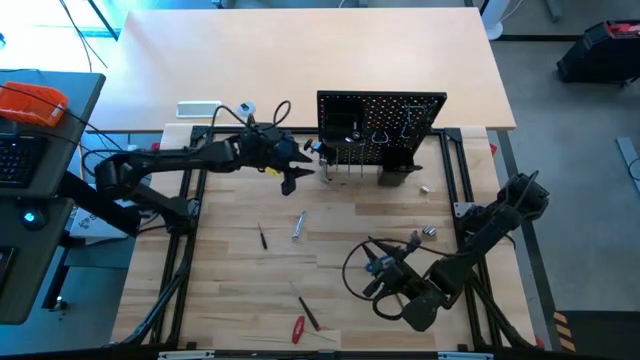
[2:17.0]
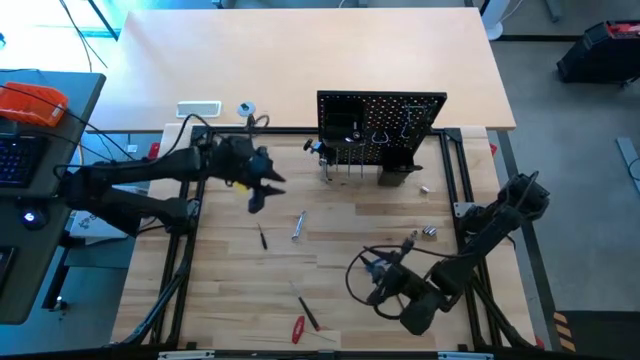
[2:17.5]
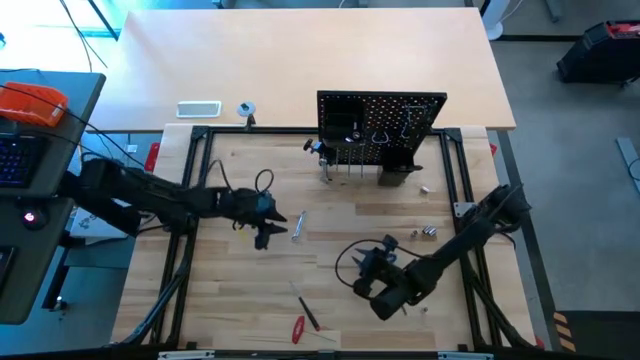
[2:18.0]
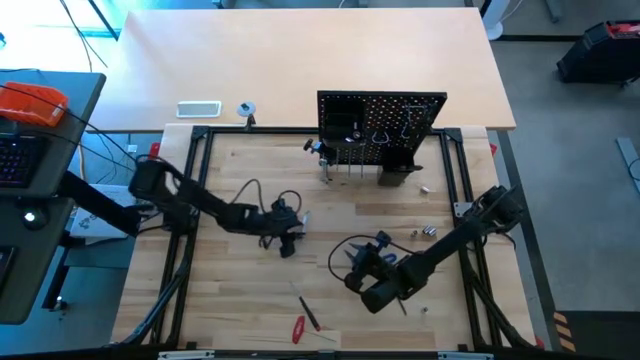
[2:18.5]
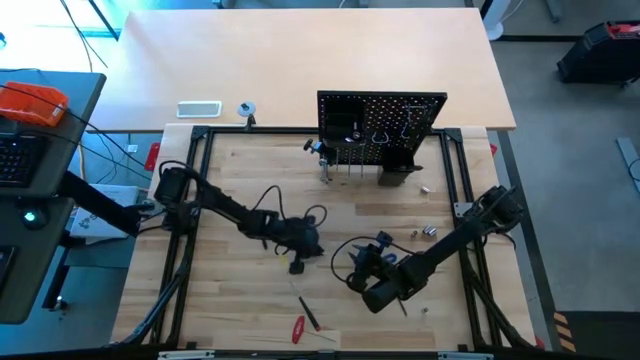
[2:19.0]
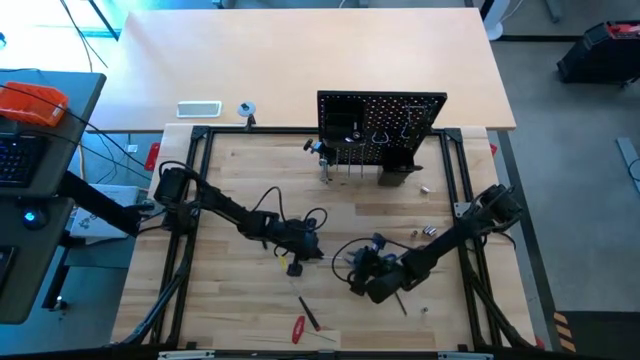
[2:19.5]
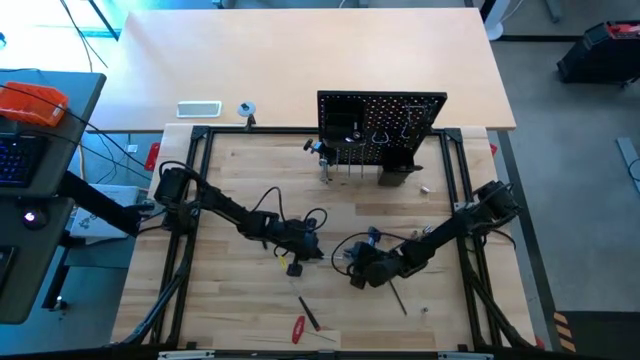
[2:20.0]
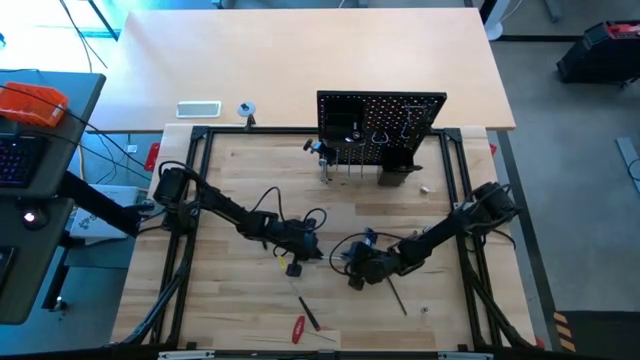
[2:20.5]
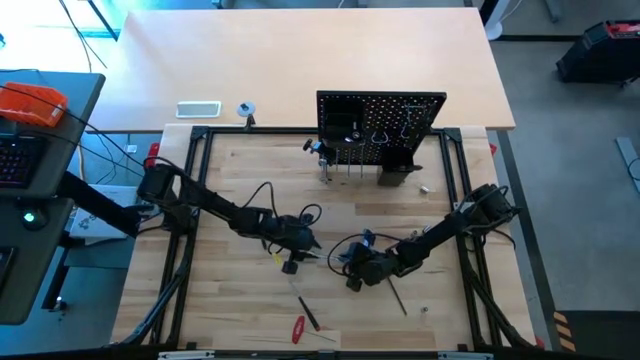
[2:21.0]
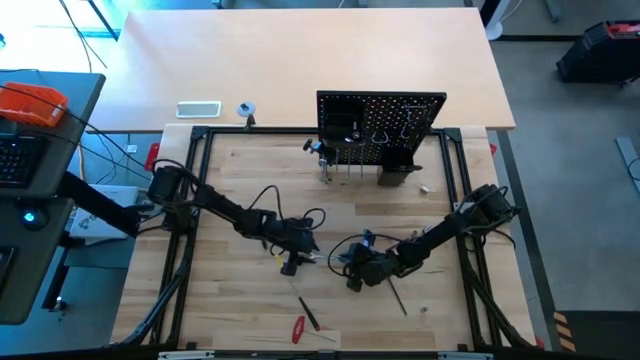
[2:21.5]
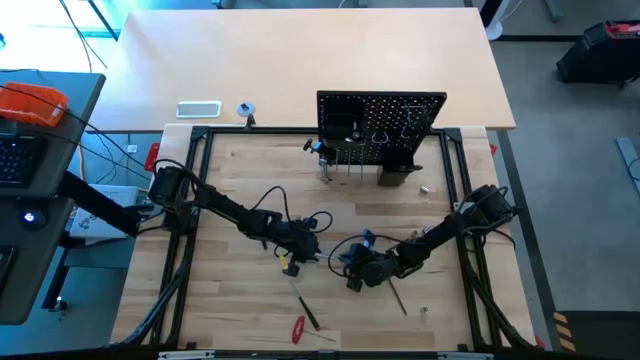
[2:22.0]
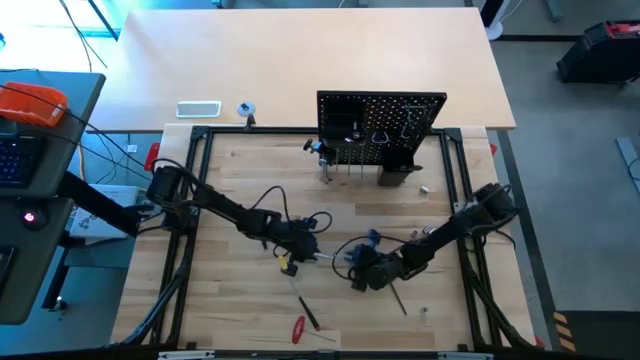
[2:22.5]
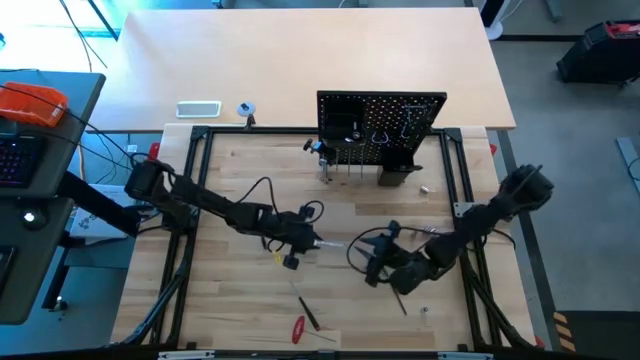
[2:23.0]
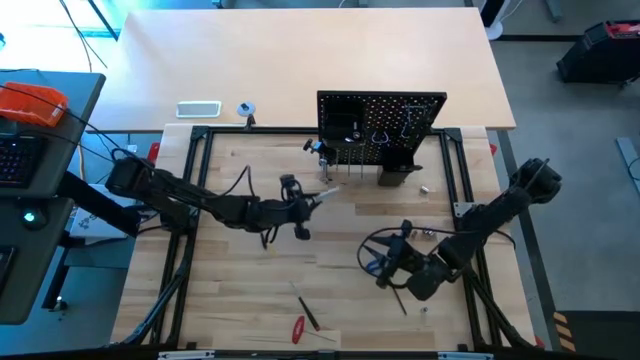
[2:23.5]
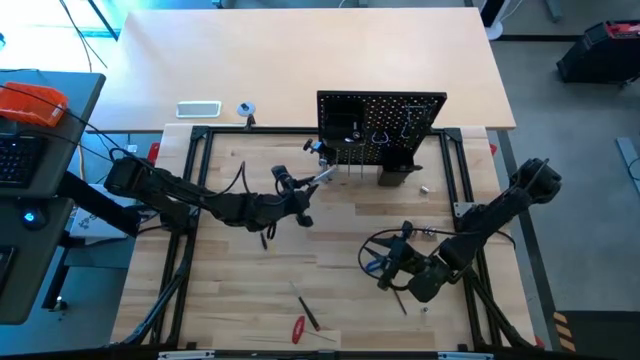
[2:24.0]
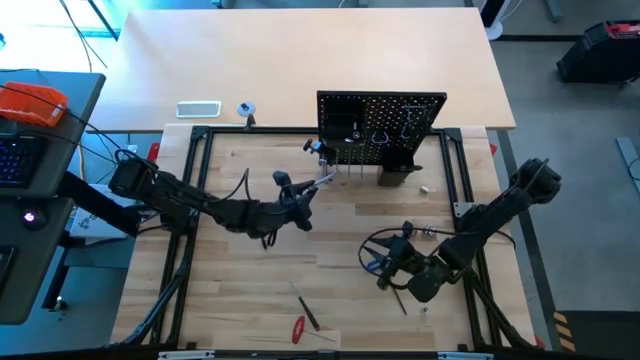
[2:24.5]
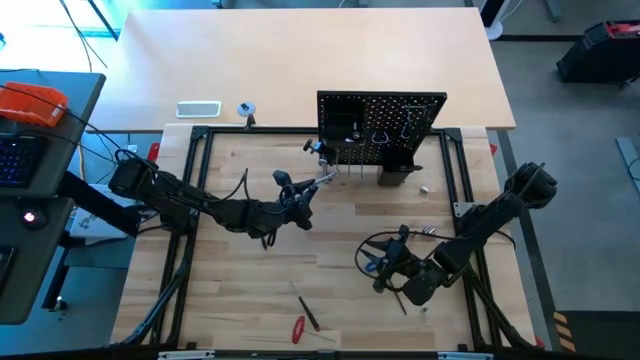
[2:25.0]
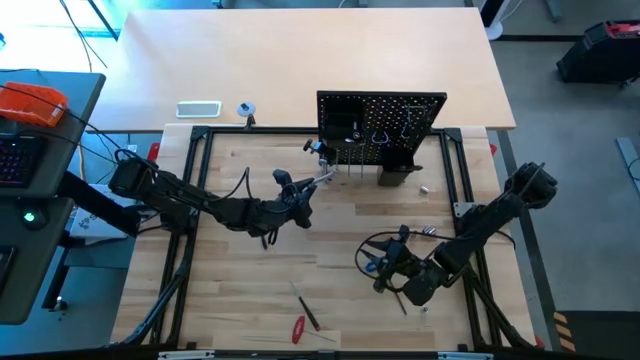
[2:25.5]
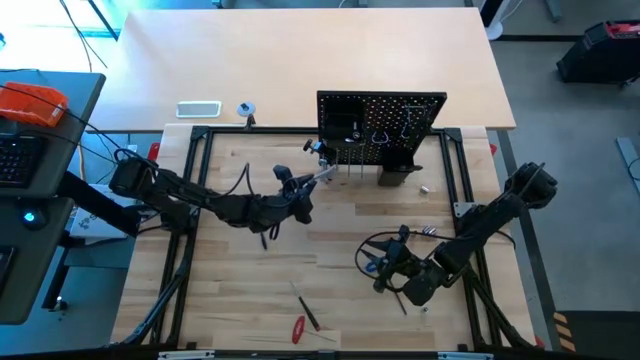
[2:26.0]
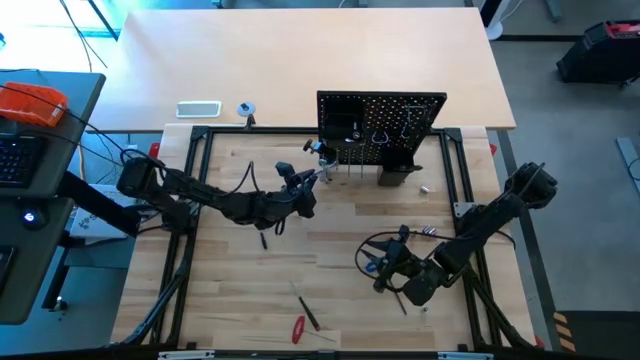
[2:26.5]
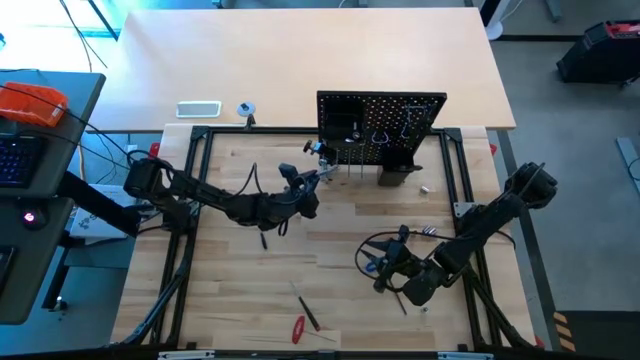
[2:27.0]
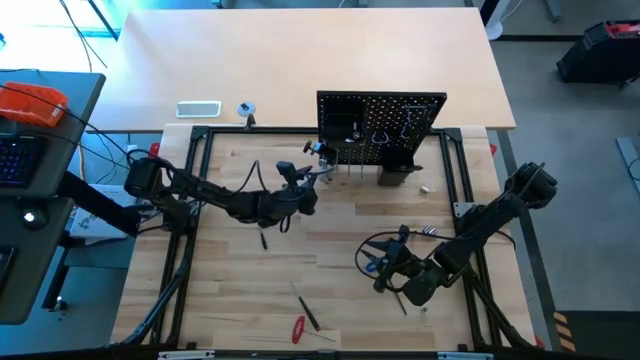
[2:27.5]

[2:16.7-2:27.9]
Task: Hang tools onto peg board
Hang the silver combination wrench onto the pegboard

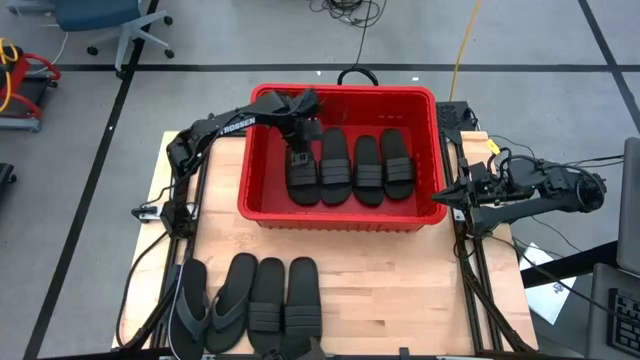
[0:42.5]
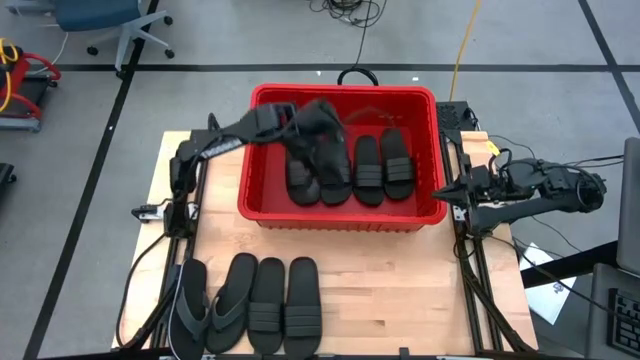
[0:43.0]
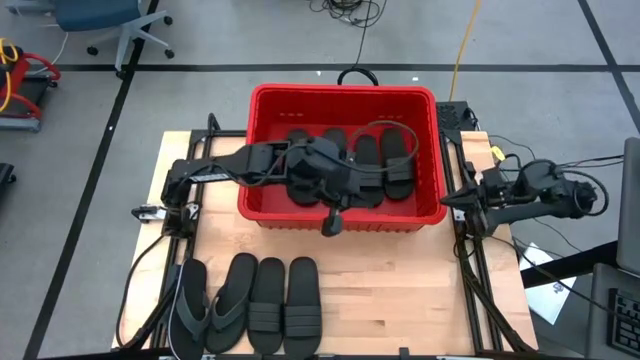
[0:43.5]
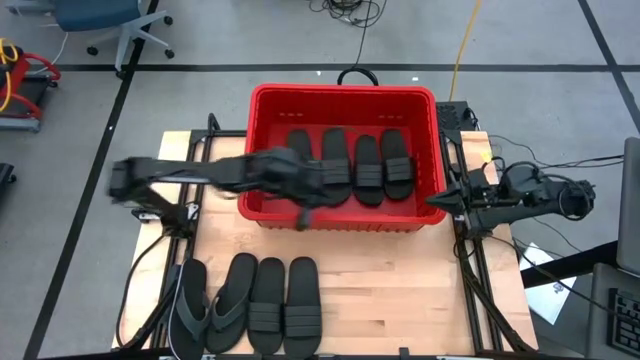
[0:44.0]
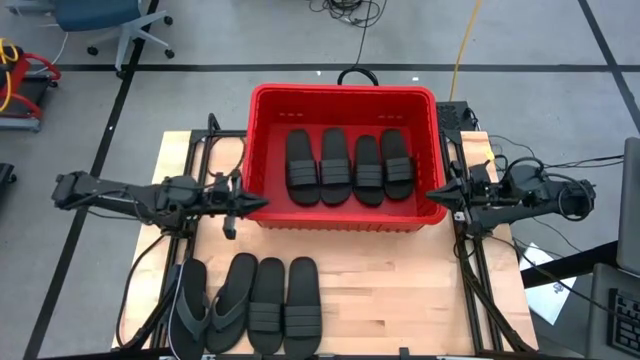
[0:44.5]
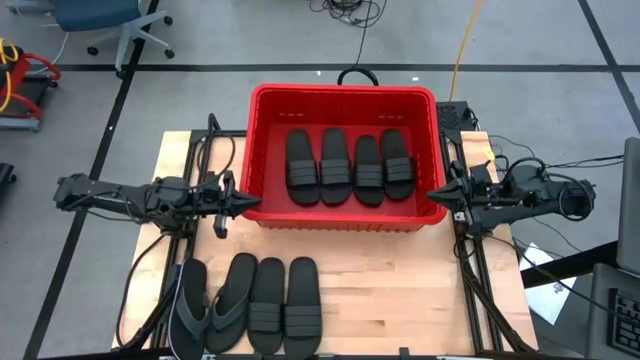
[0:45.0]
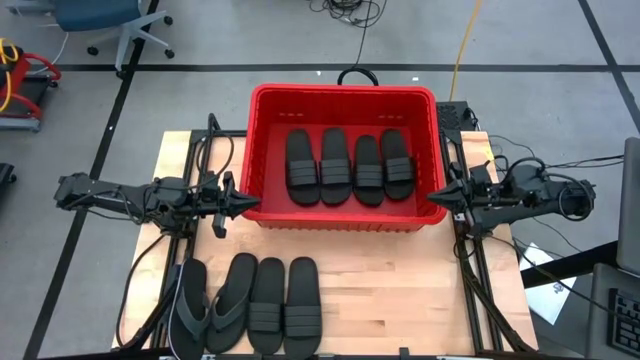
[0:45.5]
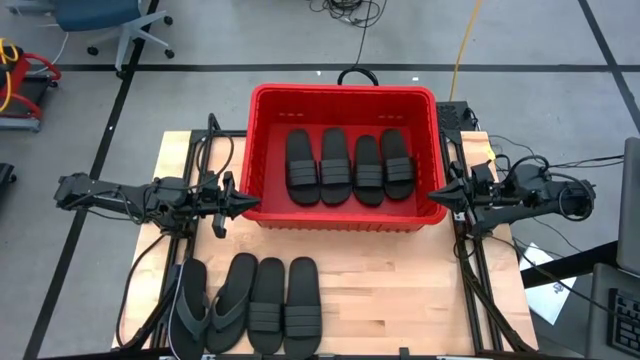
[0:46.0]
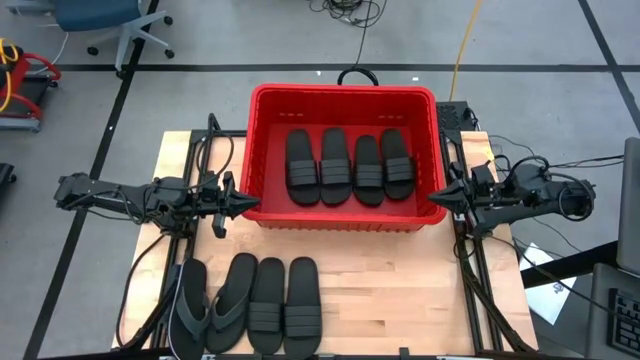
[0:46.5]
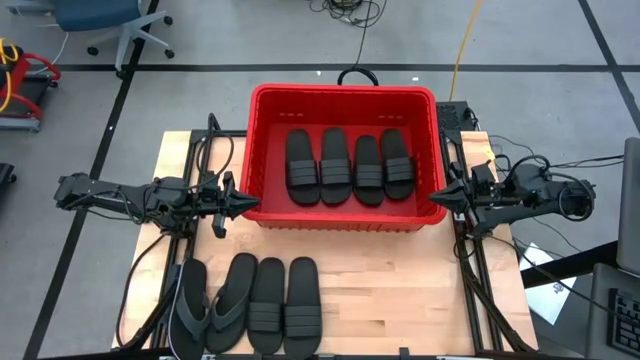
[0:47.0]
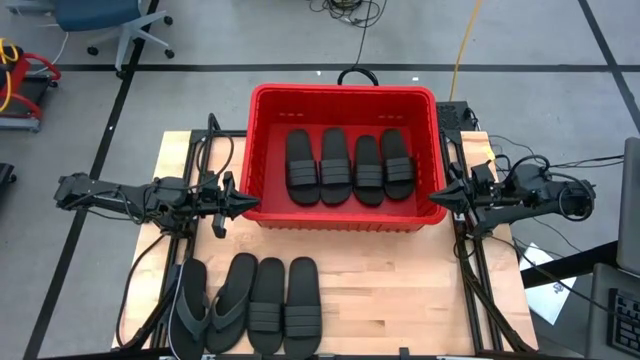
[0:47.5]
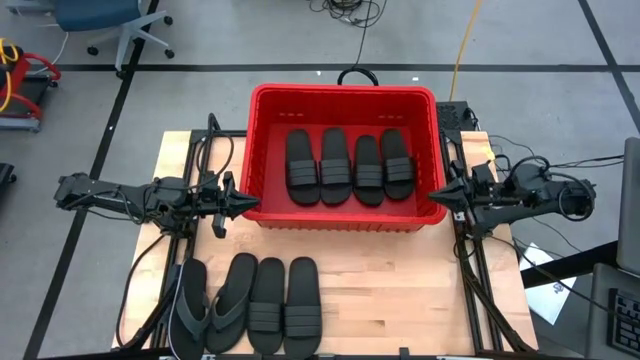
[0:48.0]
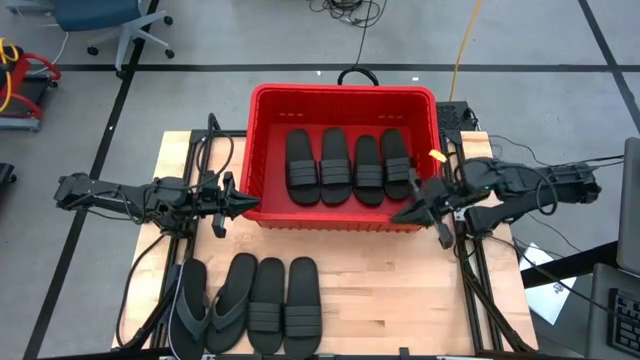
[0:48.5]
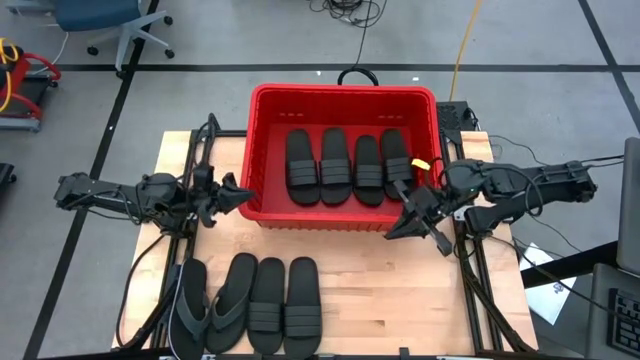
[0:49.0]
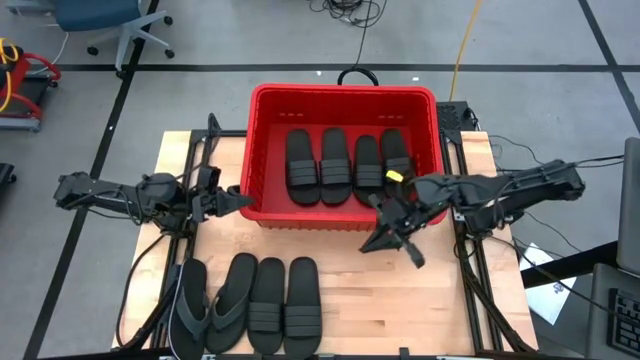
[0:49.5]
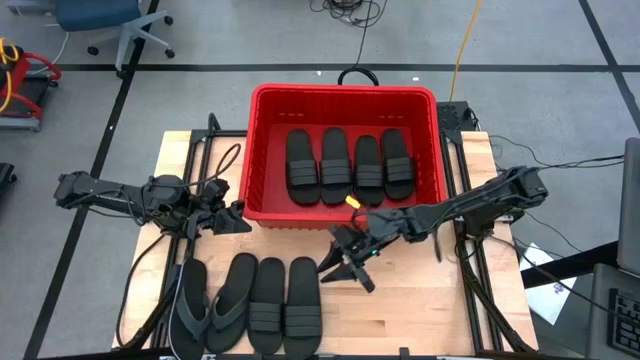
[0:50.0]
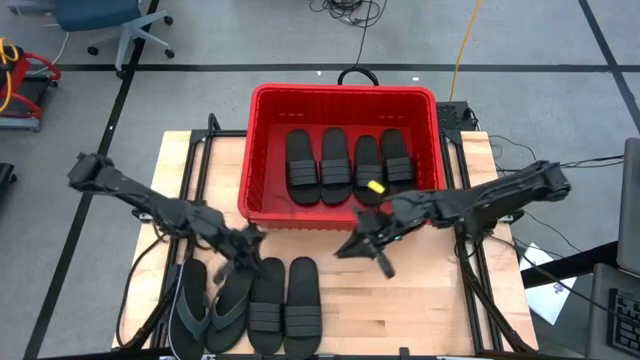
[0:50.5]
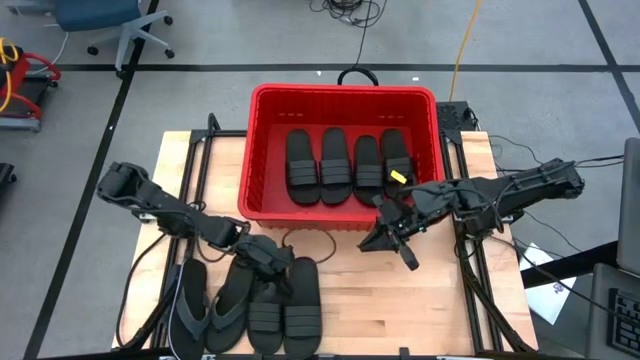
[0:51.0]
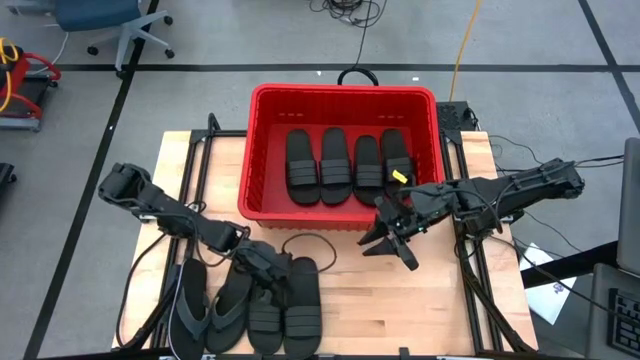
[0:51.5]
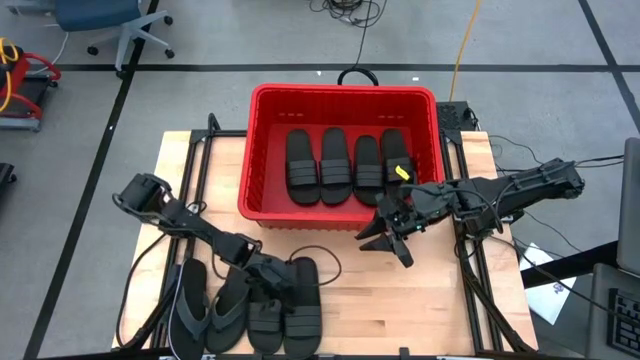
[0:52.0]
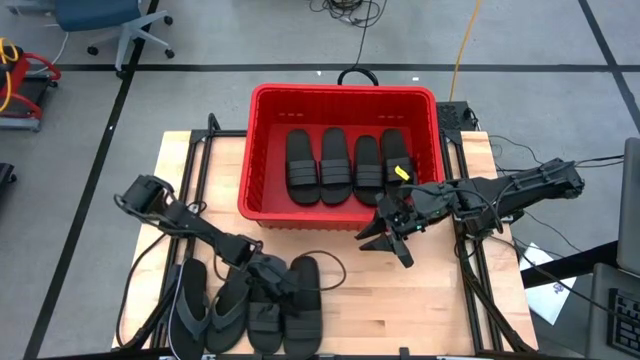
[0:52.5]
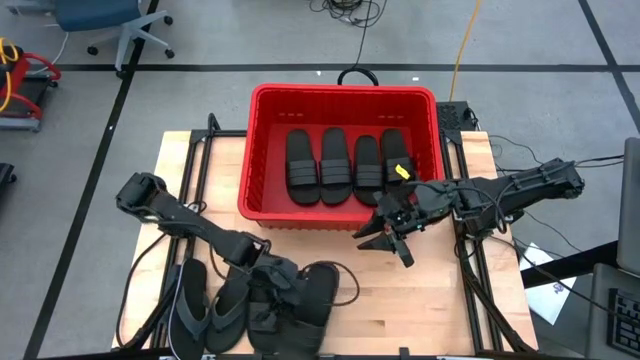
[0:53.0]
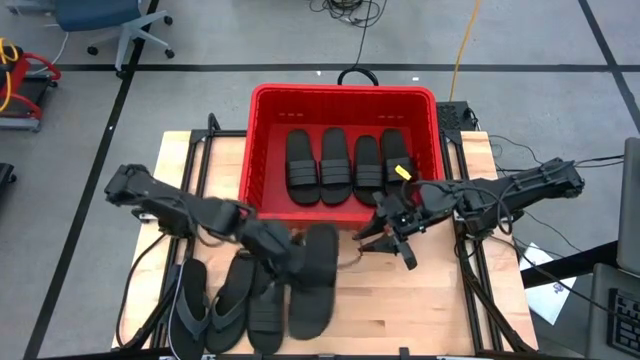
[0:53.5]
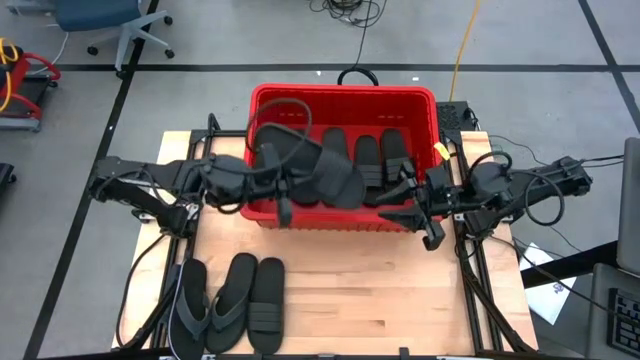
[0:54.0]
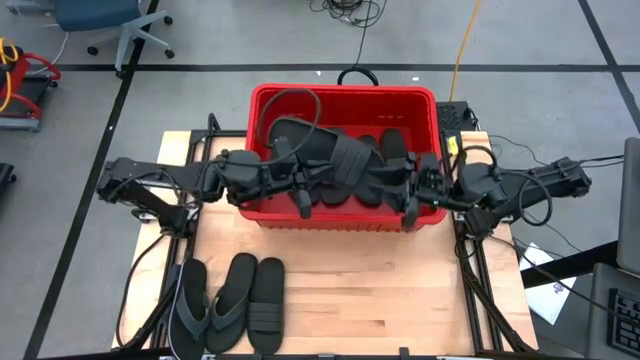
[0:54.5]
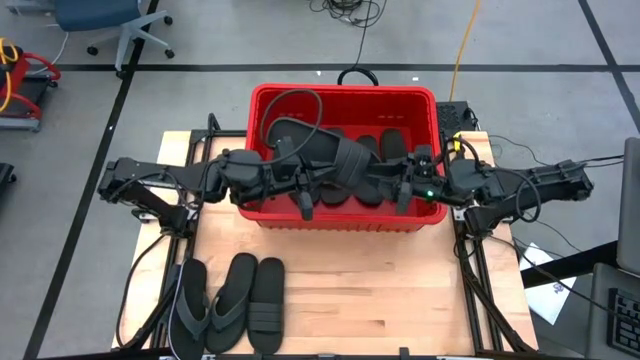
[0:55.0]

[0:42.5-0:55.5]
Task: Pick and place slides into bin
Put the black slide into the red bin
